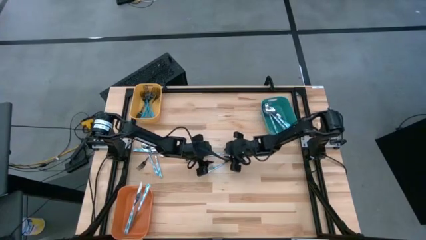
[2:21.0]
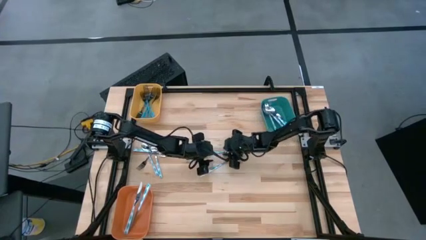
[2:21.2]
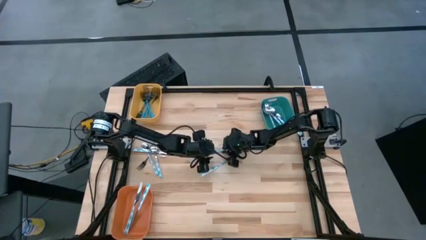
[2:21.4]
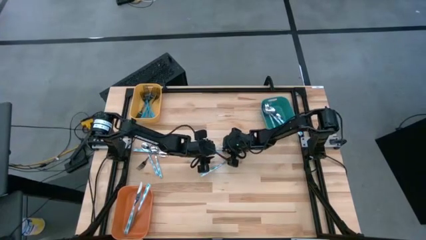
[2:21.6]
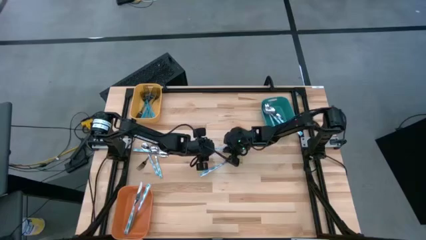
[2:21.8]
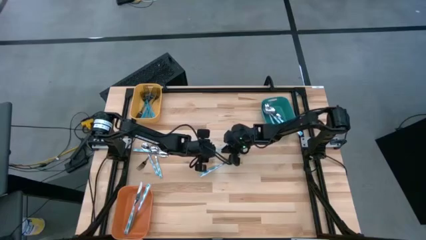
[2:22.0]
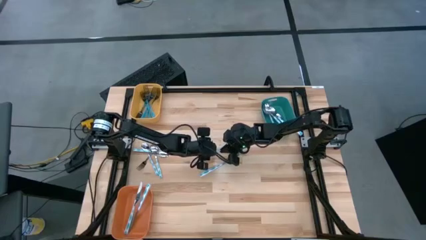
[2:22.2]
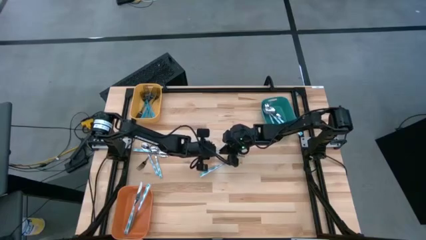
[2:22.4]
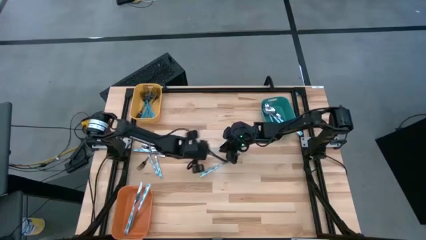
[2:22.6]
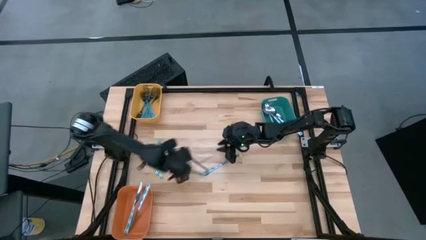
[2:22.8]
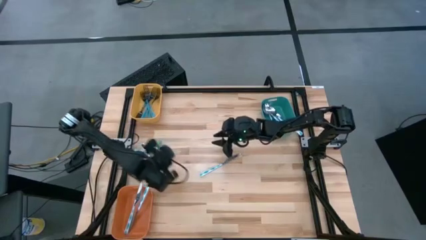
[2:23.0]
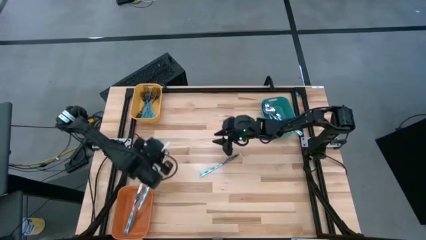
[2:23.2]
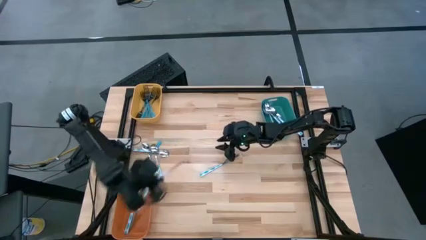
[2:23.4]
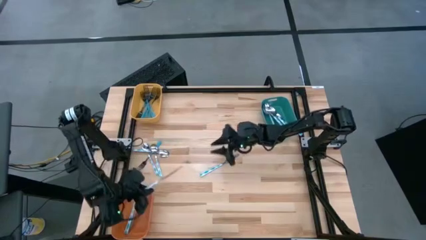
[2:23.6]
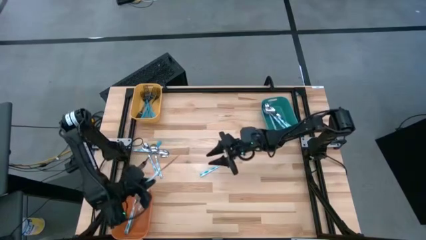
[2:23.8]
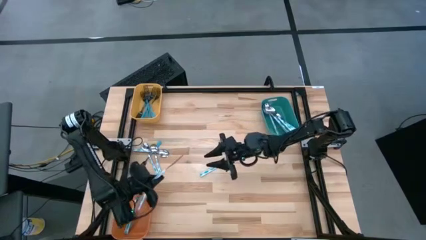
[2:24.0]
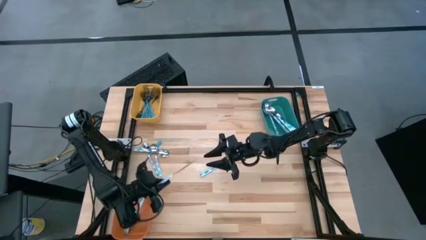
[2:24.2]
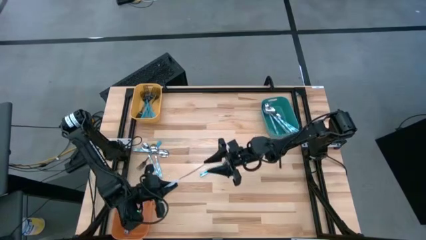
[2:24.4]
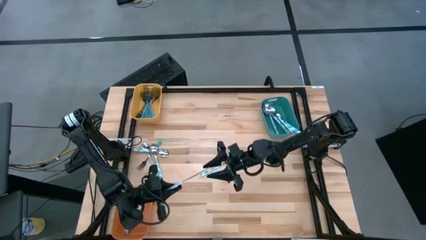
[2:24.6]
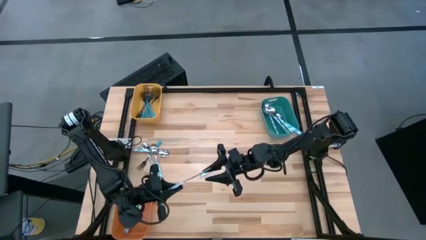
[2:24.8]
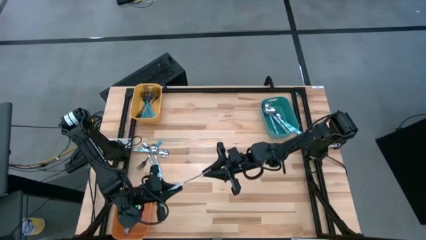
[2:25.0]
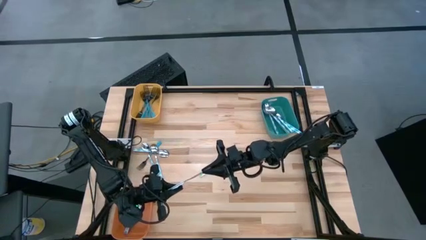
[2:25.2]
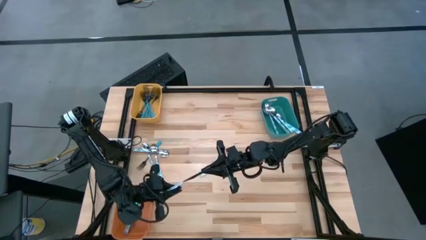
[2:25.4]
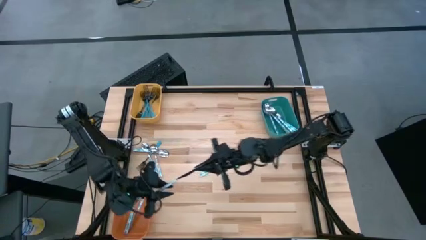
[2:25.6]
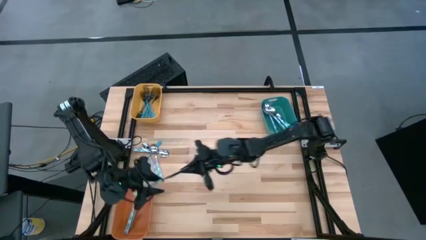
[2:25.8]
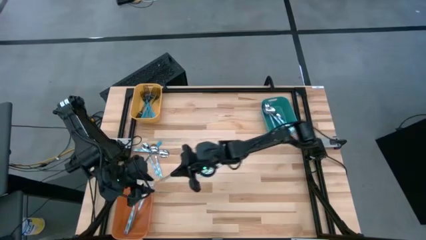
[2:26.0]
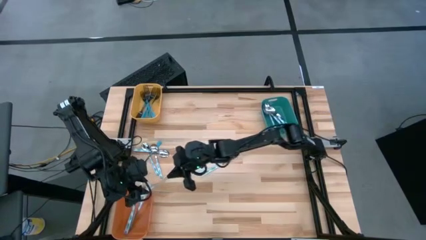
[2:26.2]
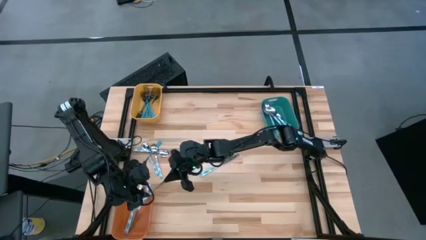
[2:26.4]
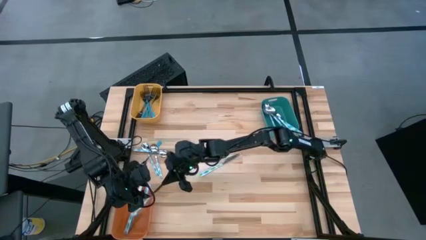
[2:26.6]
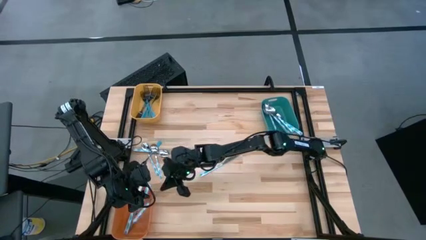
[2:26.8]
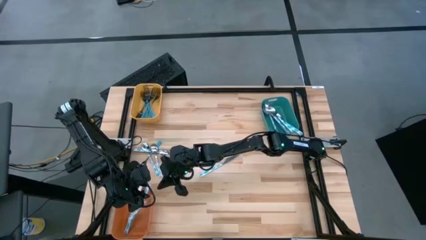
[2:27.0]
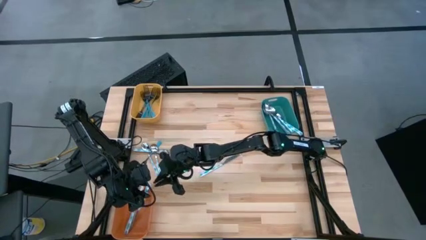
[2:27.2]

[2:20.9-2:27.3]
Task: Sort silverware by color (type)
Put the white-blue table knife into the orange bin

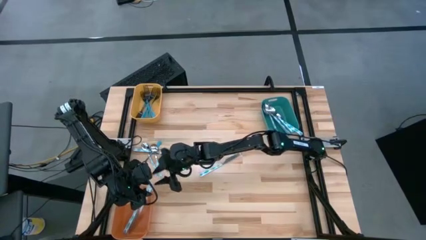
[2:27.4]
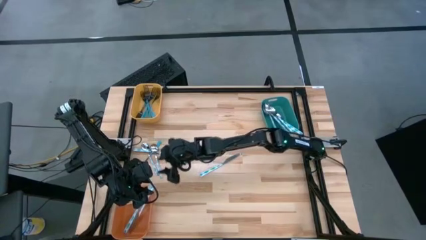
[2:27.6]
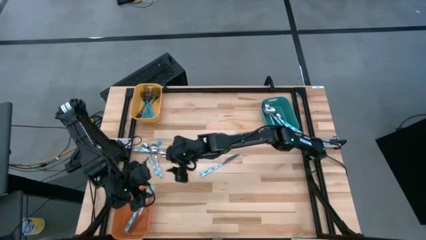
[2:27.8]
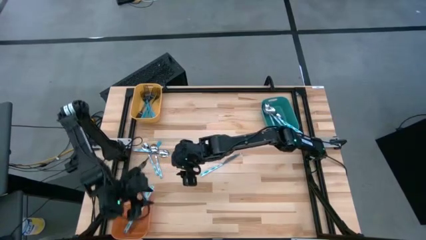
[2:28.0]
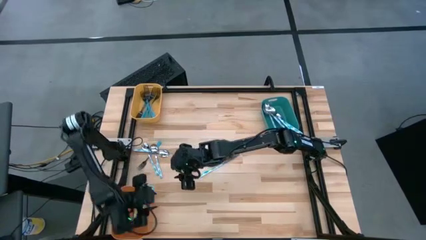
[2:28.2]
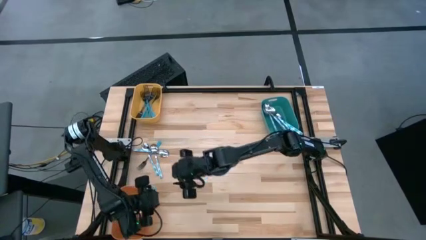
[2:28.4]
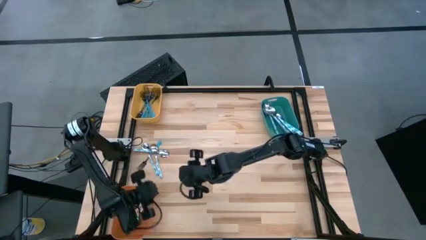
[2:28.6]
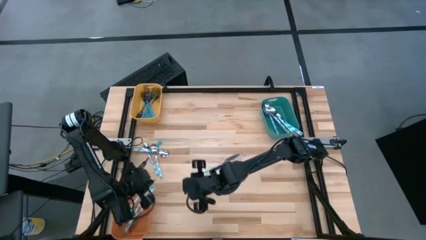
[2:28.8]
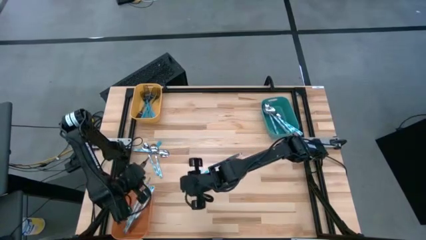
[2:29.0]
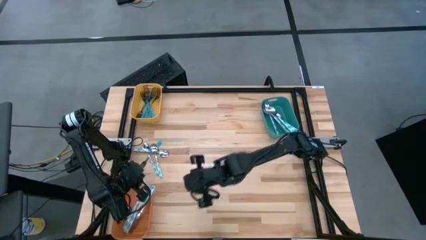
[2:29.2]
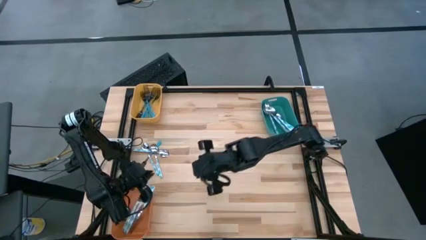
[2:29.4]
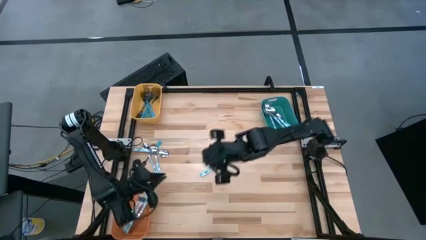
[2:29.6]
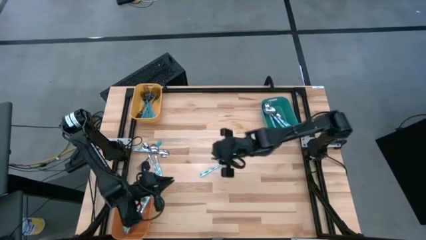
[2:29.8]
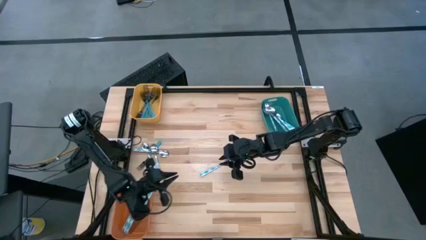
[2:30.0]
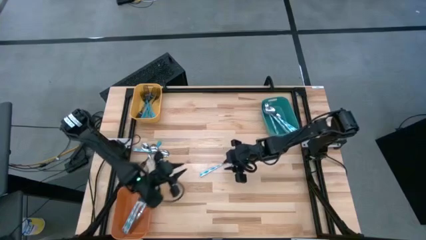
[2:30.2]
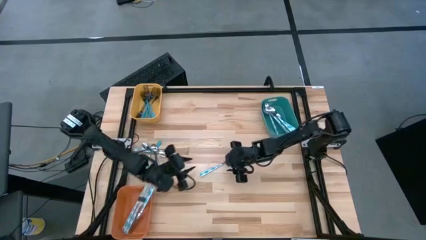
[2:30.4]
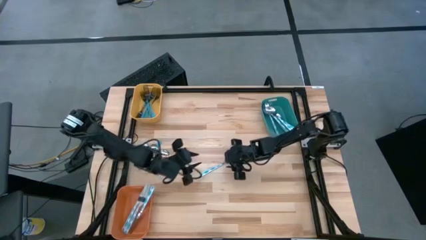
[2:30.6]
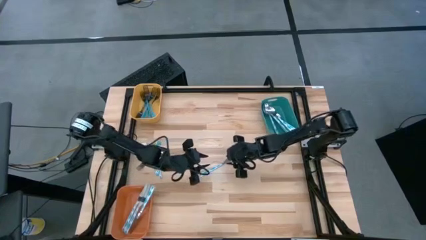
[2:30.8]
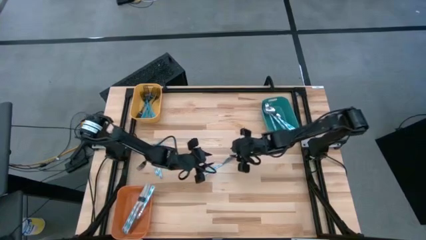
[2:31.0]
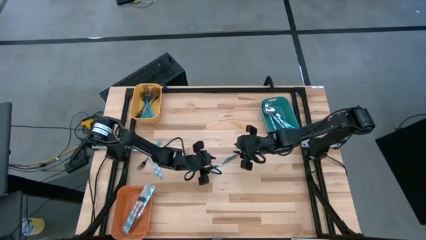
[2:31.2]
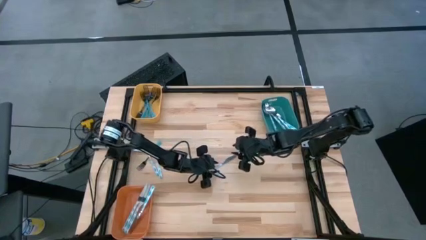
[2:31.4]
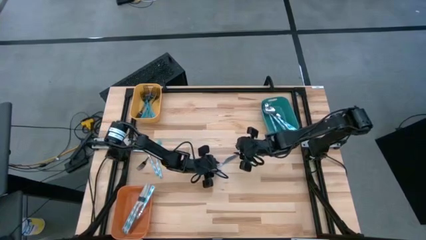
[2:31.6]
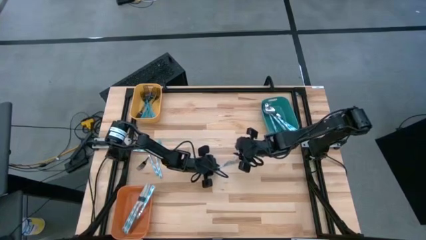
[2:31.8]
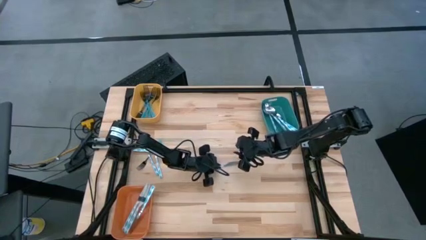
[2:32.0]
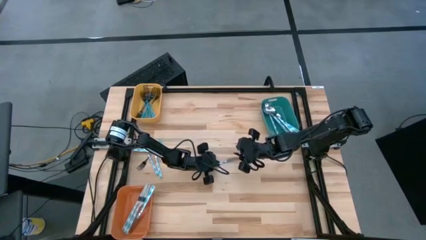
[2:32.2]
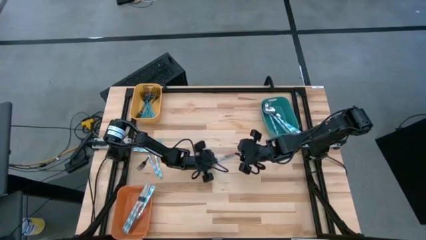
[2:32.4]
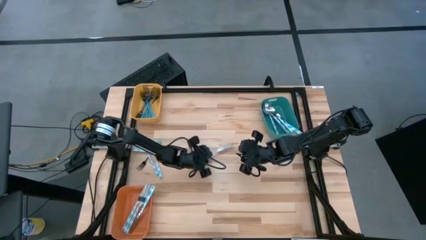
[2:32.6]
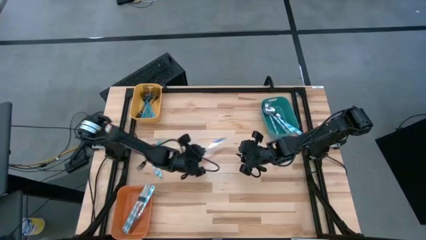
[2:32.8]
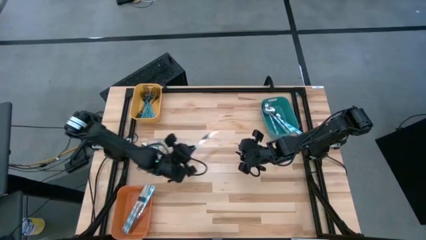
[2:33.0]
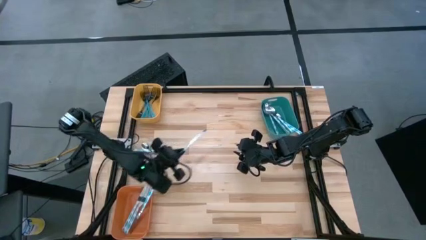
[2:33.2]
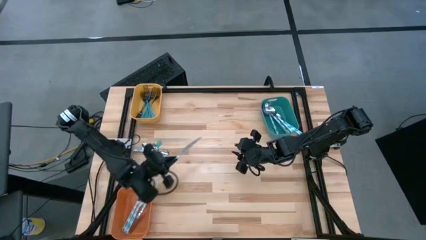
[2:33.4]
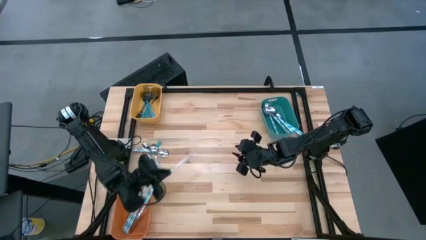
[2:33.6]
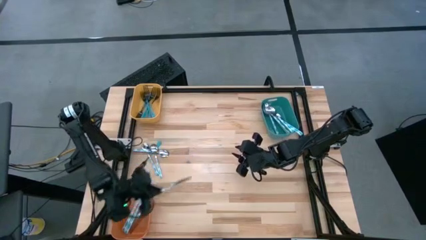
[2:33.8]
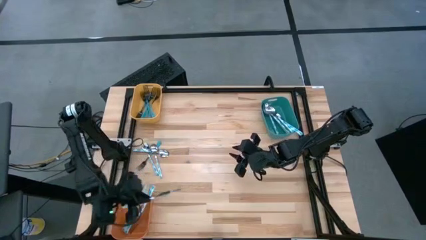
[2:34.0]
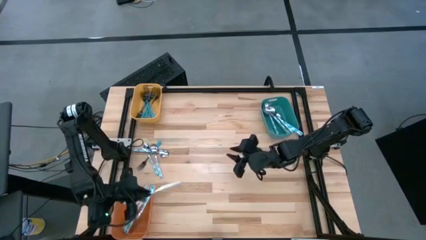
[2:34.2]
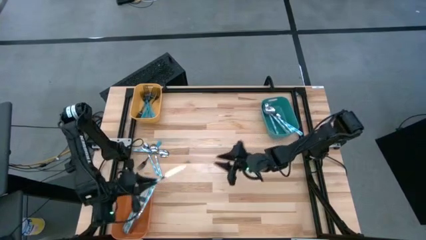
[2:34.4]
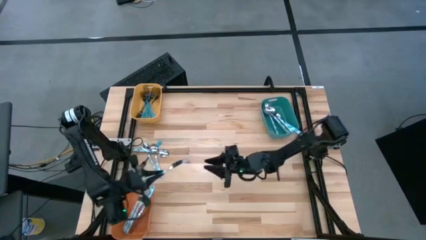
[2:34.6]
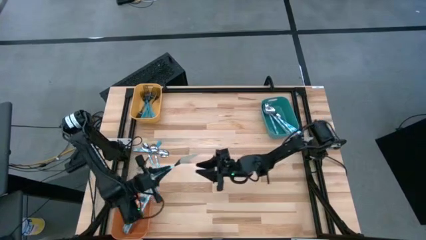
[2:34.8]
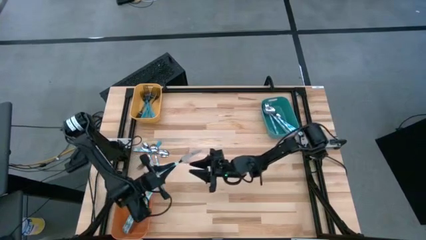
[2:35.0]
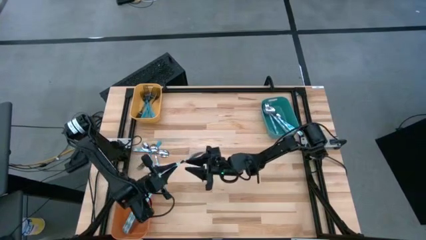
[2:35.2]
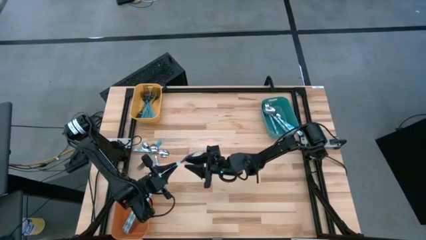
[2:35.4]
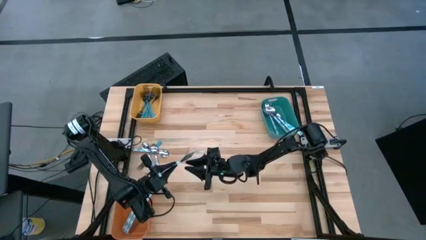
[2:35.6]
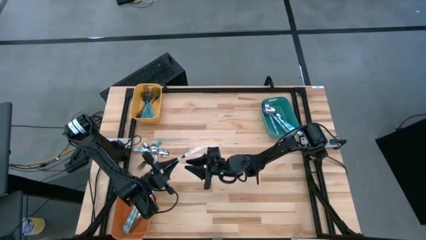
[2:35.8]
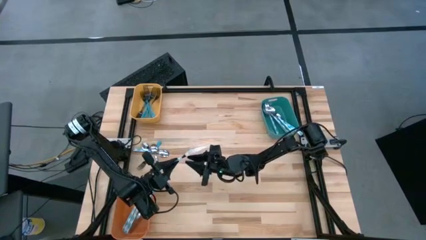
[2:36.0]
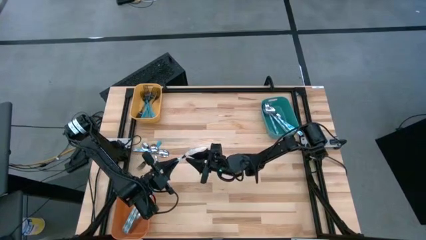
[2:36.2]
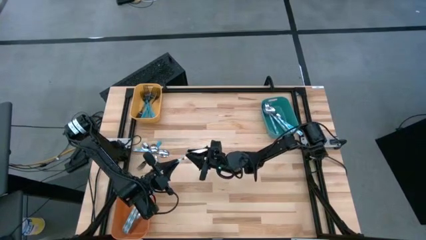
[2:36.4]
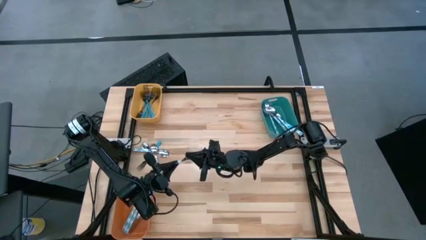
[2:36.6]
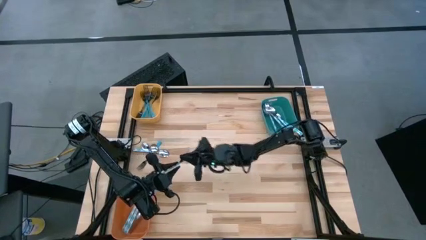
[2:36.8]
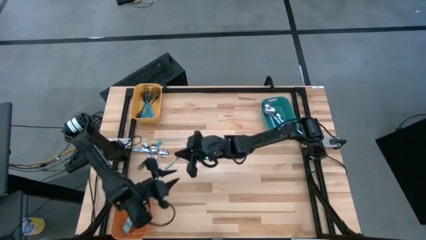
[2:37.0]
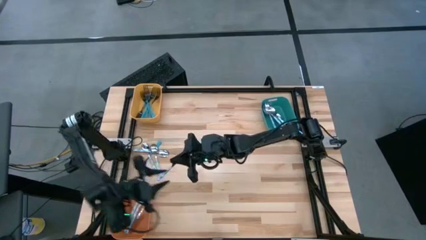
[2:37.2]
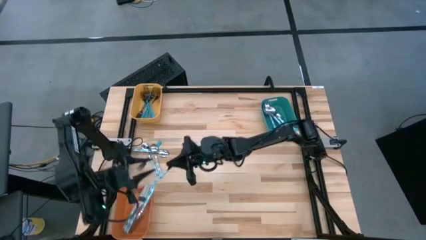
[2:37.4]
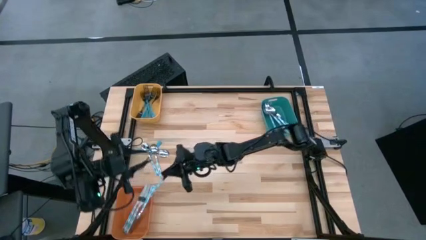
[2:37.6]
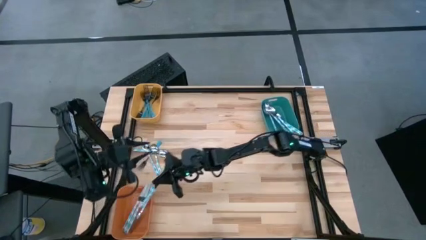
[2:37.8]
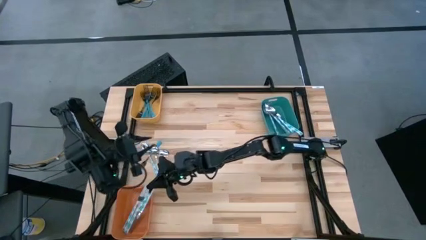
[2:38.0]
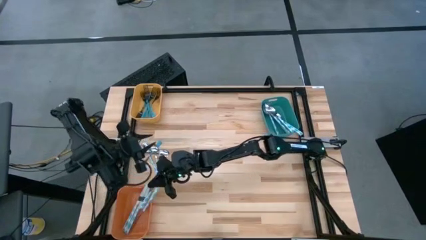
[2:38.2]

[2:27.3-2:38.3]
Put the white-blue table knife into the orange bin
